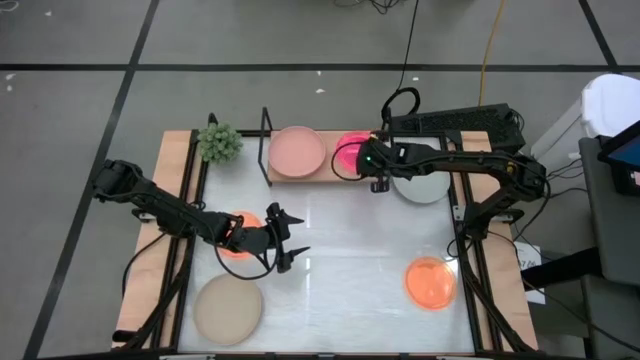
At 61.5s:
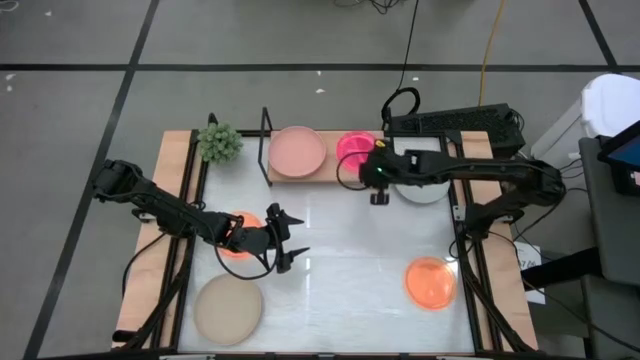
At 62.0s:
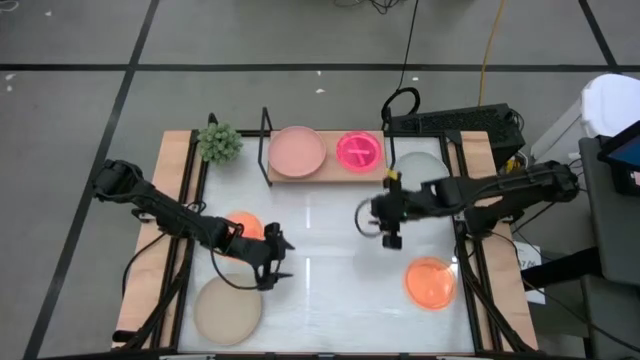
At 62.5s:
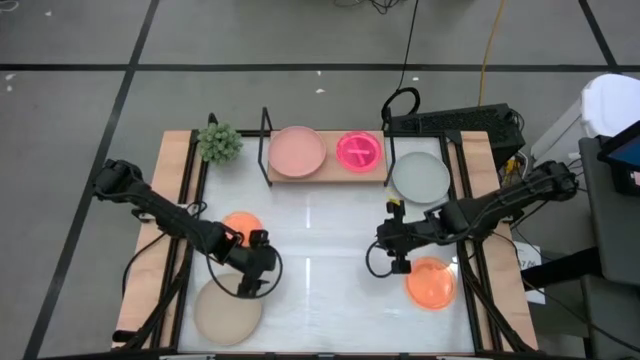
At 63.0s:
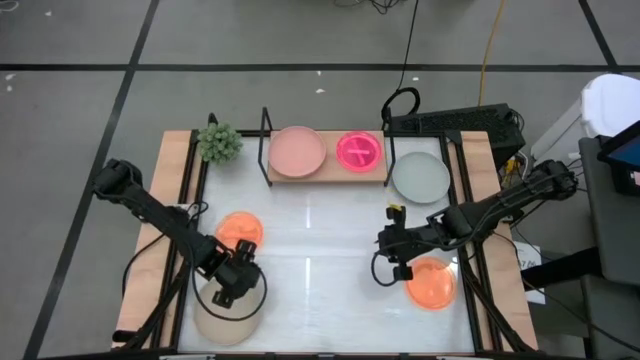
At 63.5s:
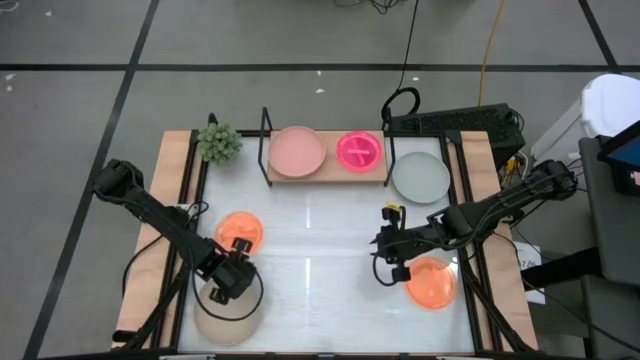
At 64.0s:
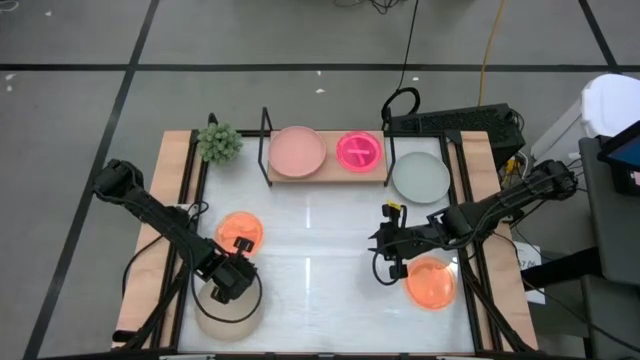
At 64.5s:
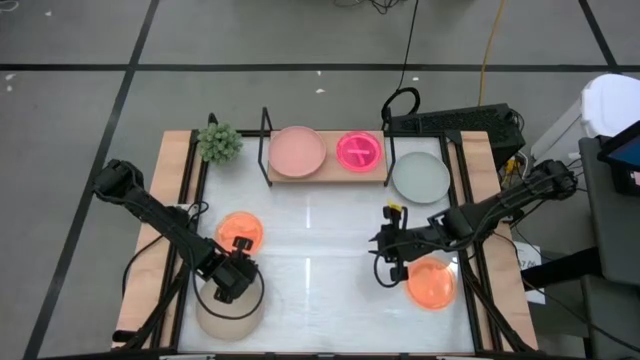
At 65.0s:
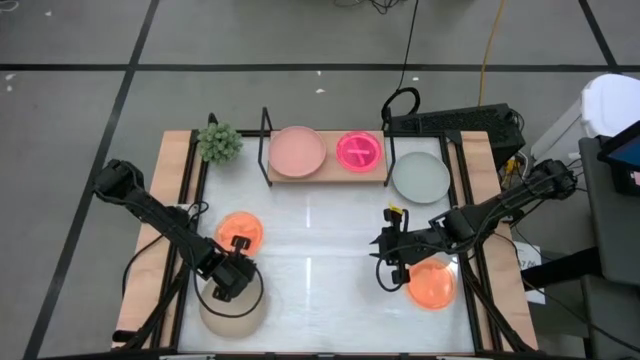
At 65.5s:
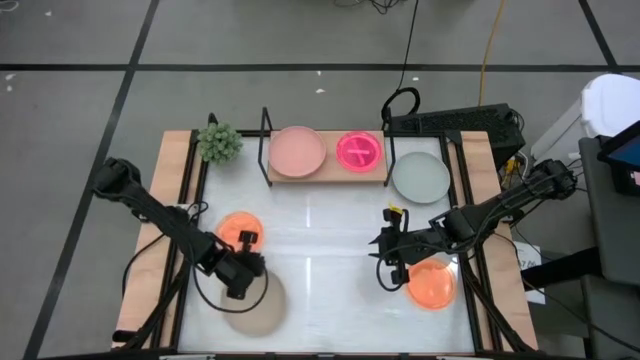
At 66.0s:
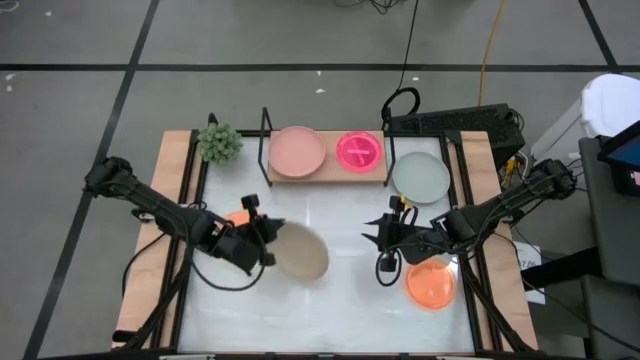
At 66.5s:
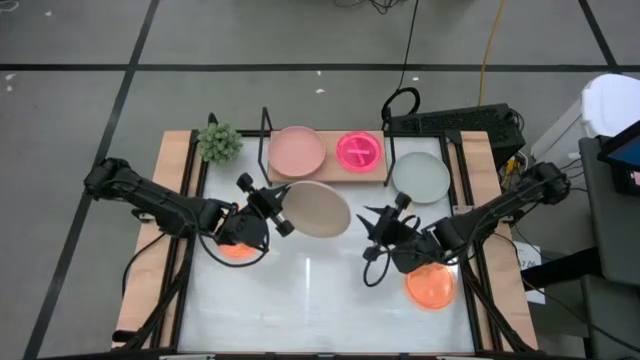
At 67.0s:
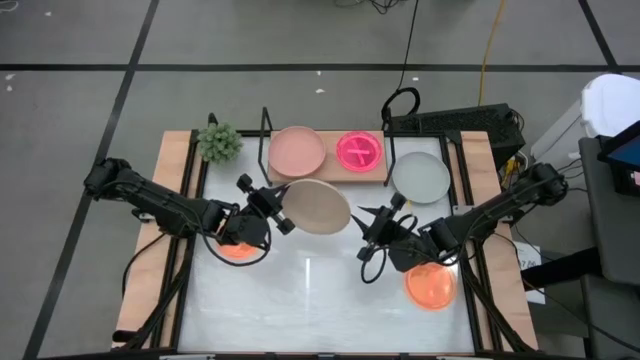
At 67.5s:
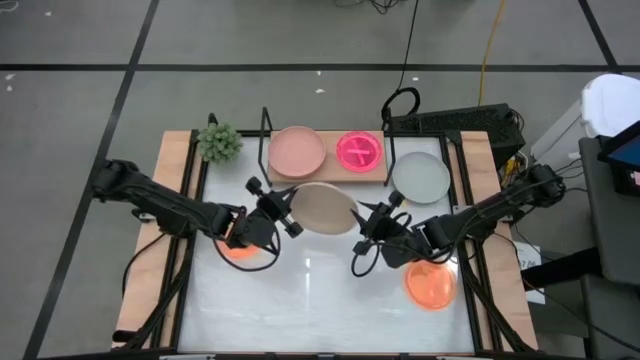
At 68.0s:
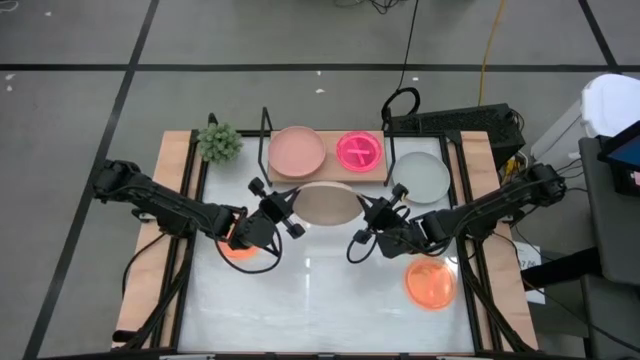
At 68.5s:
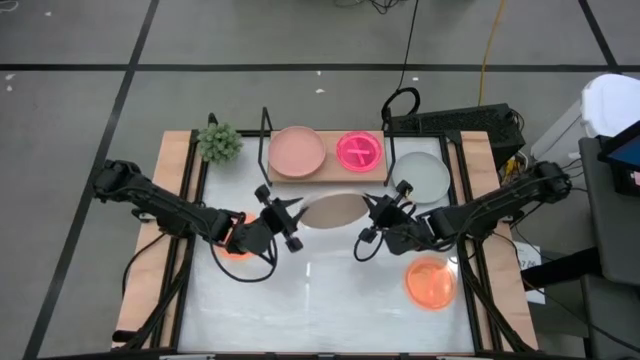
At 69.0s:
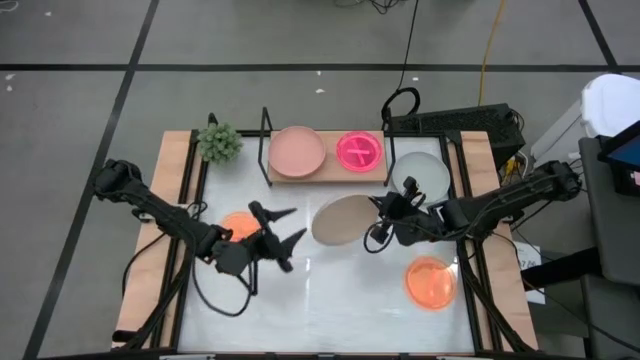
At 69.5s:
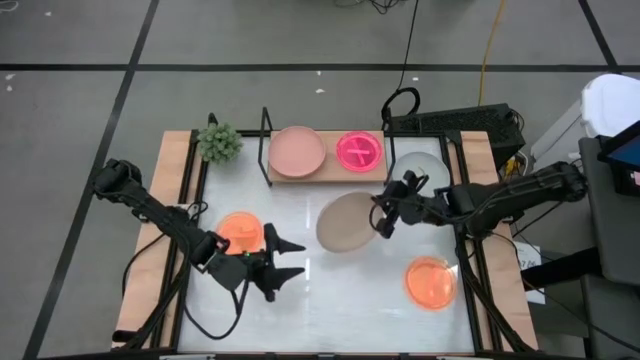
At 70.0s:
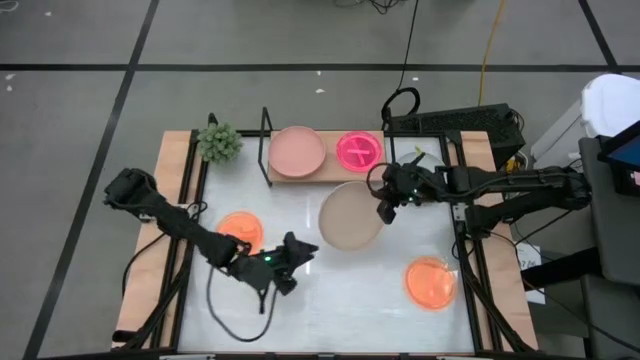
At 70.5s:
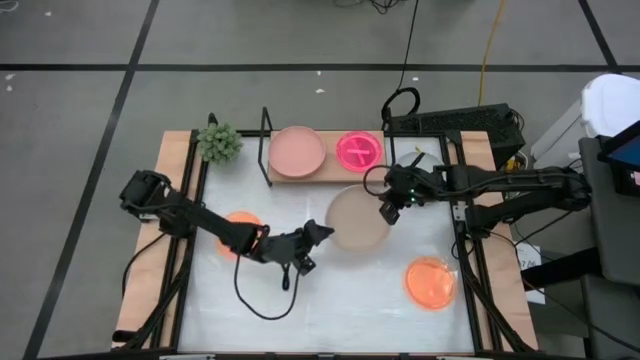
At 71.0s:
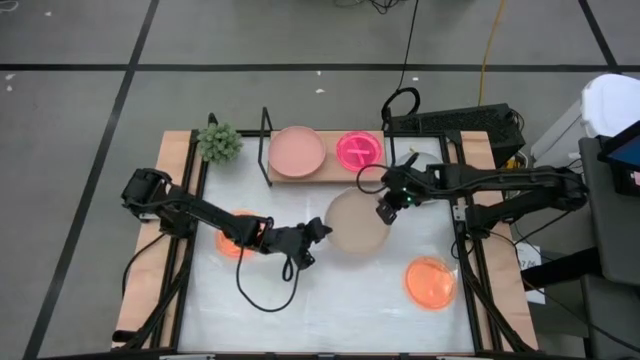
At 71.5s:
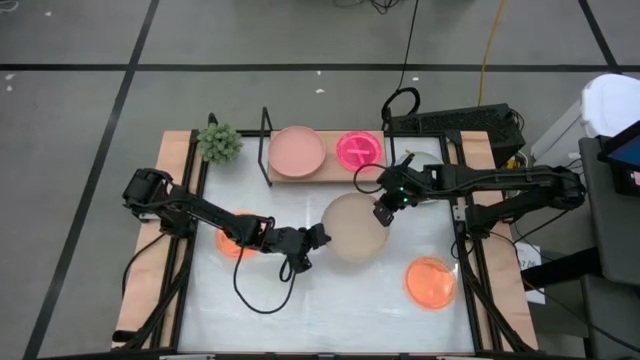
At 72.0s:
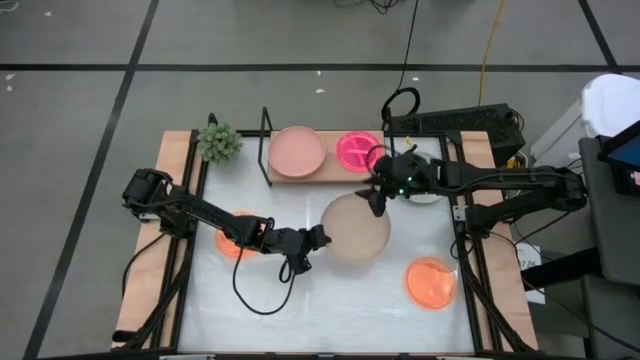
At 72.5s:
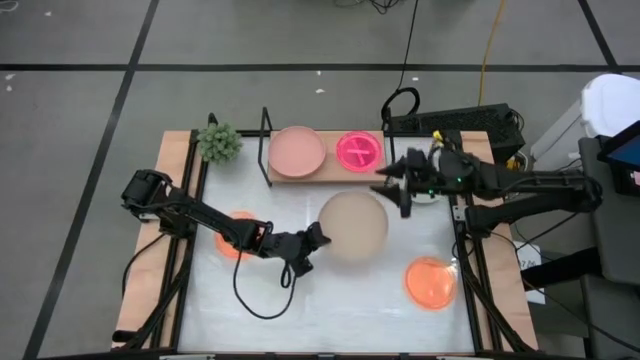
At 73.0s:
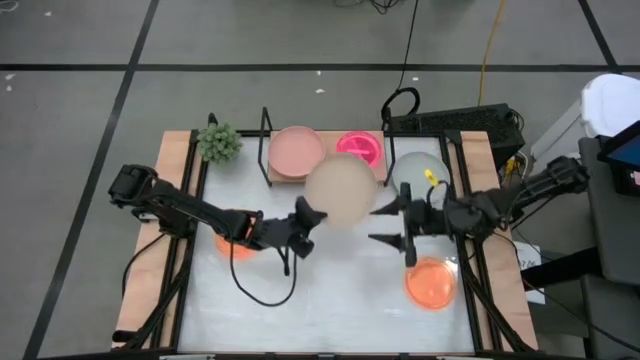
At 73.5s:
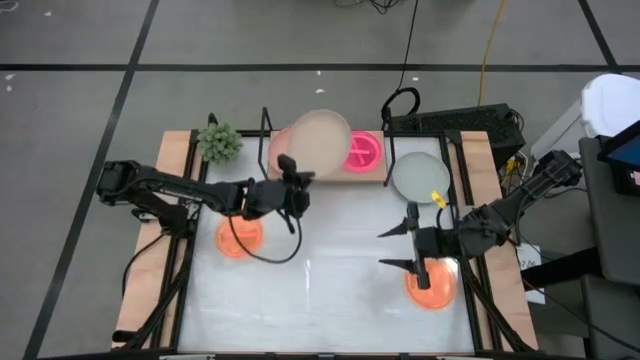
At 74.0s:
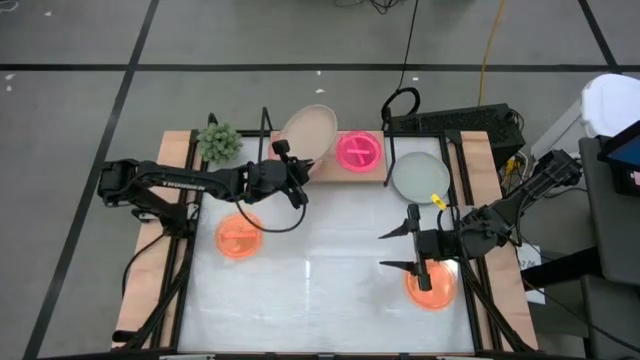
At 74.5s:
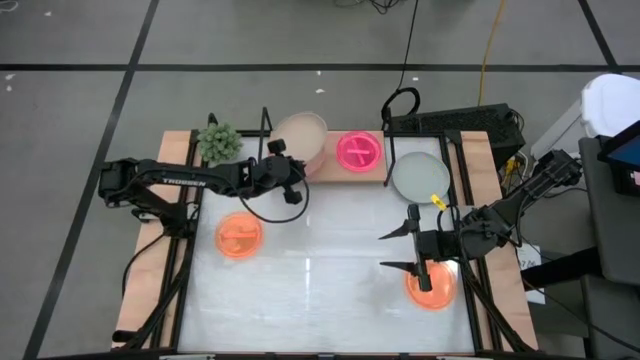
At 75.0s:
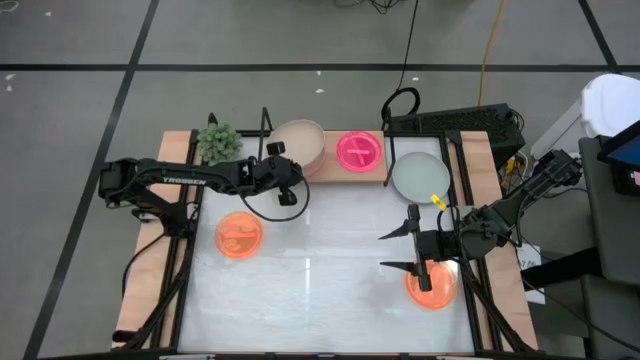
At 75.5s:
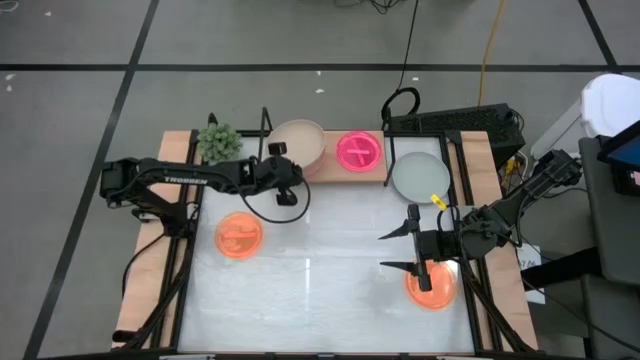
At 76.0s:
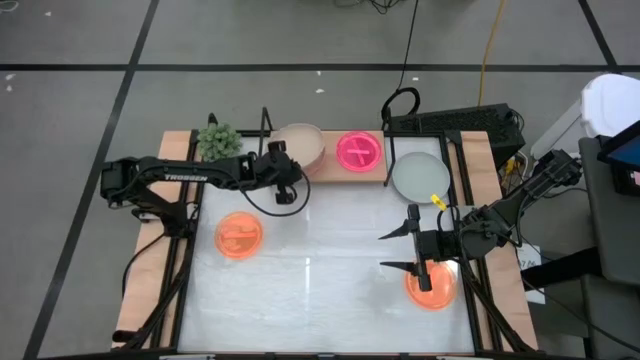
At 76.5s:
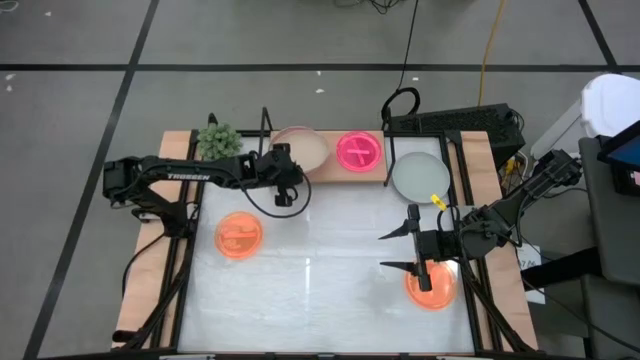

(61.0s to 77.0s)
Task: Place and stack plates onto a shelf
Stack the light brown plate on the light orange plate on the shelf

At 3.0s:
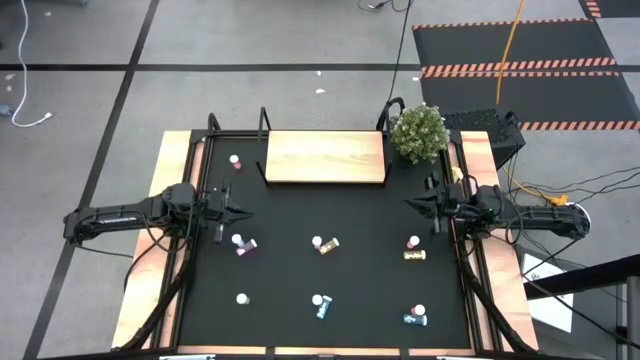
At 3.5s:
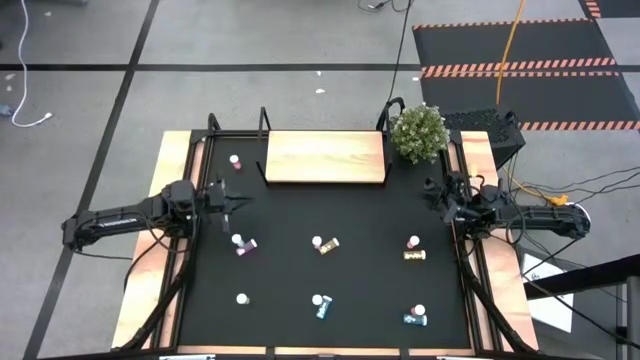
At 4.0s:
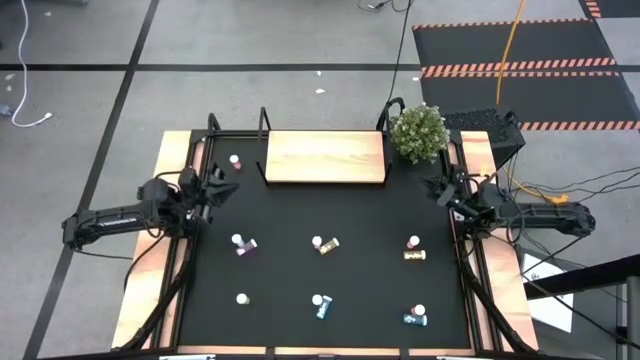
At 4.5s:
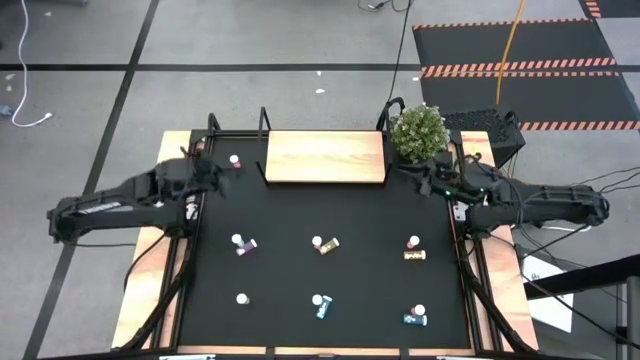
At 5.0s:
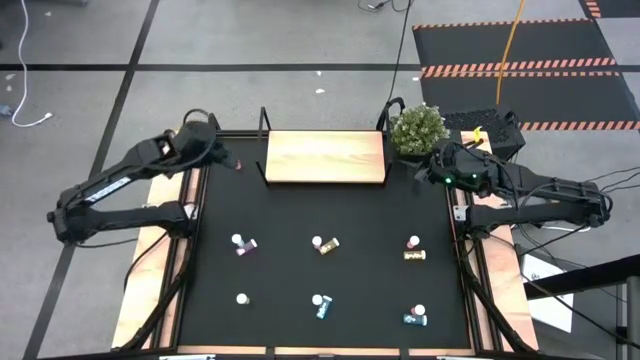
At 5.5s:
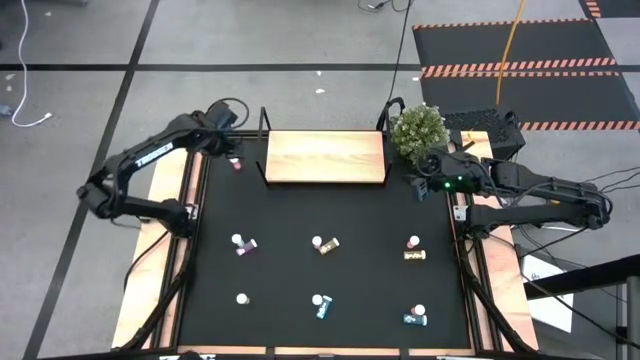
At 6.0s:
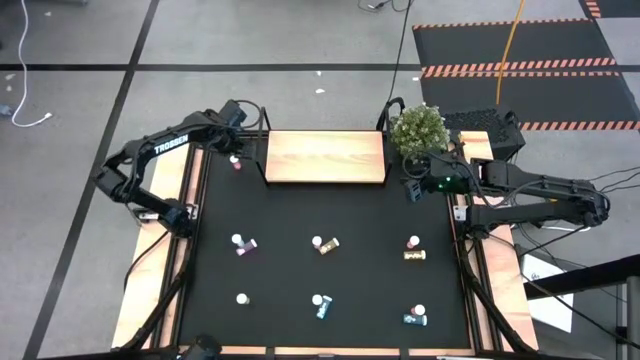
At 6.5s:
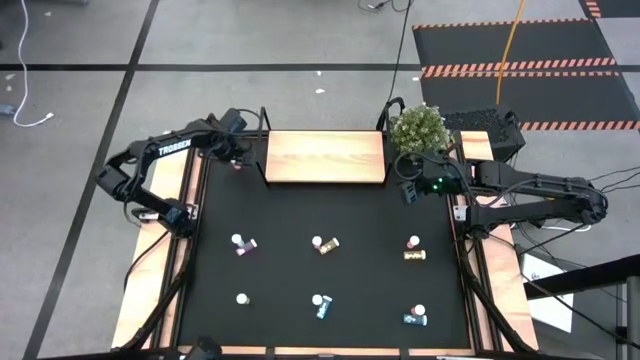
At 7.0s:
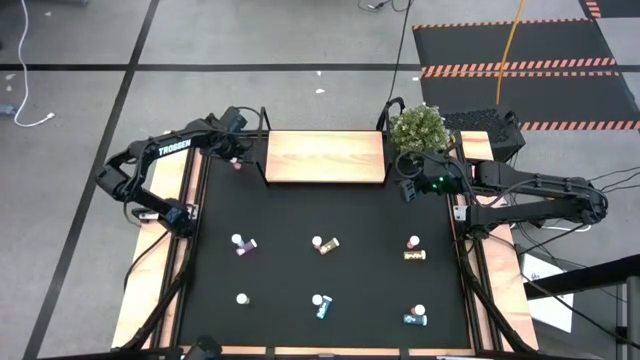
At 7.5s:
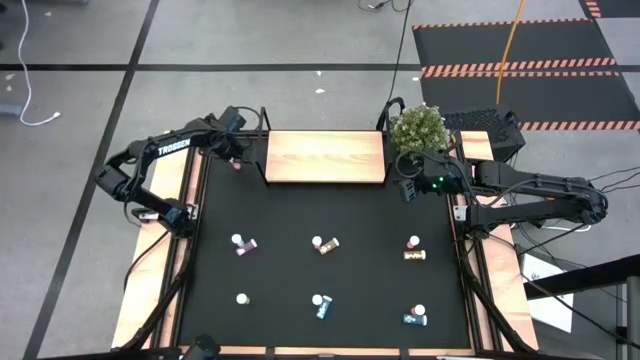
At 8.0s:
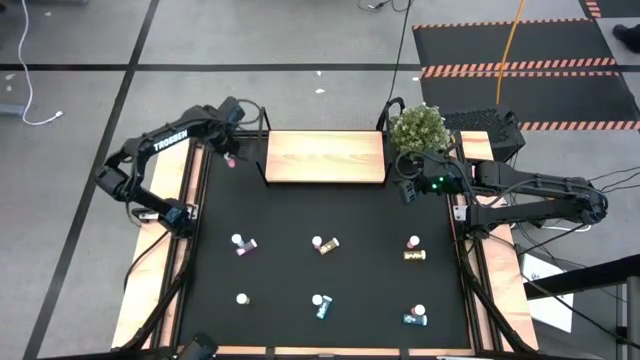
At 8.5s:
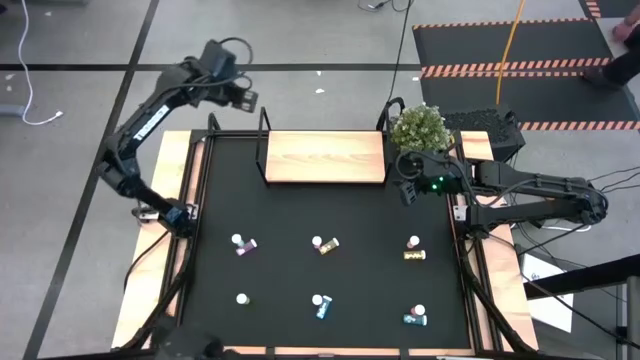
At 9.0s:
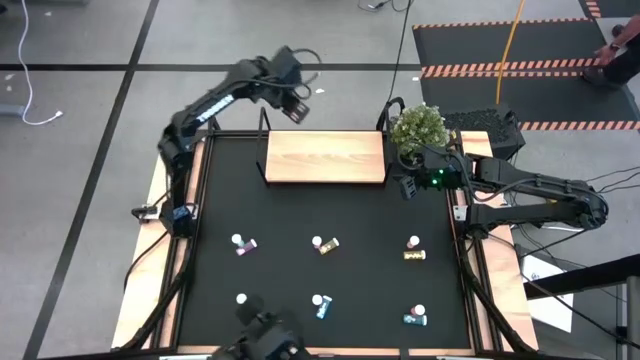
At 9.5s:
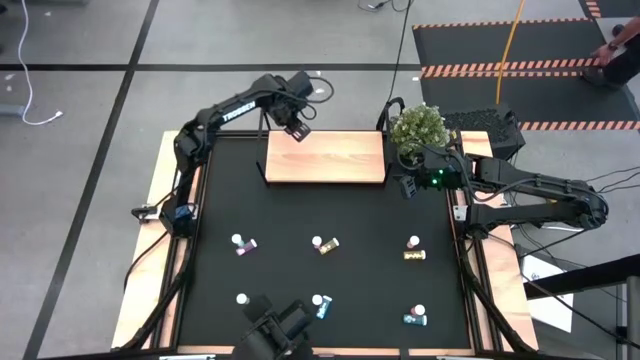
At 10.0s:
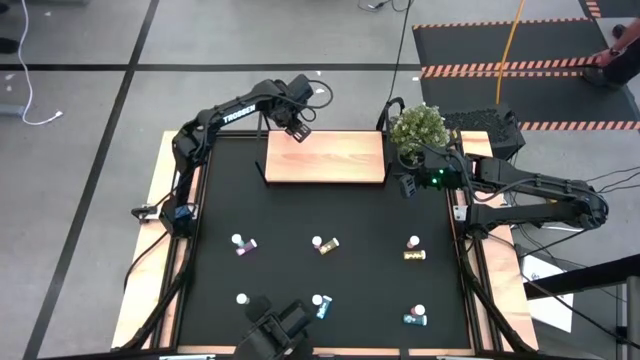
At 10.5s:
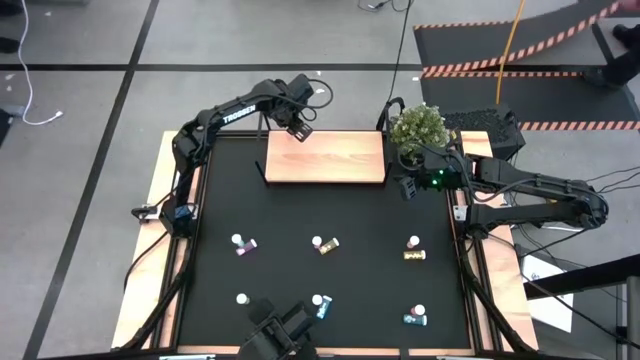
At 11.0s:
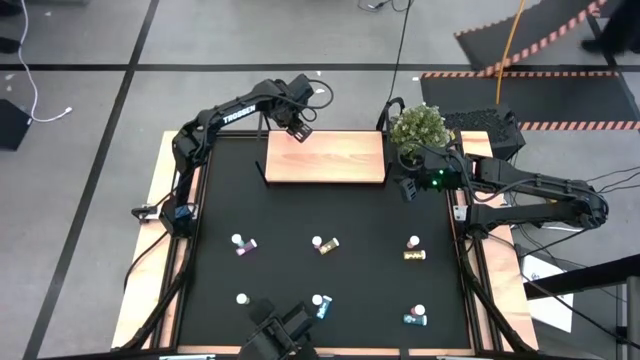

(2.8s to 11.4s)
Task: Pick and place medicine bottles onto shelf by color
Put the top orange pill bottle on the shelf
